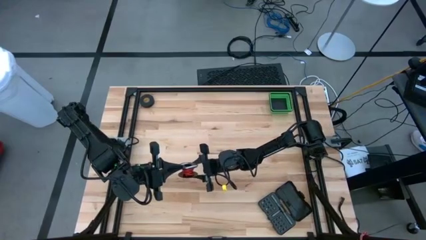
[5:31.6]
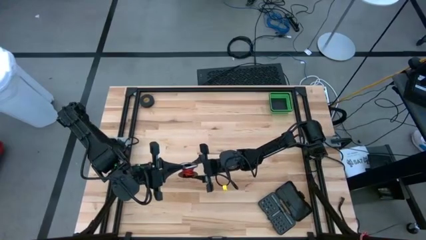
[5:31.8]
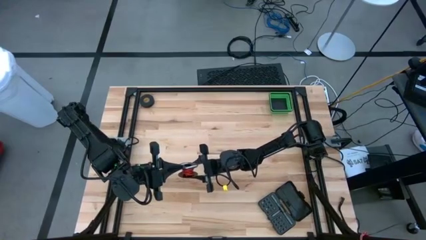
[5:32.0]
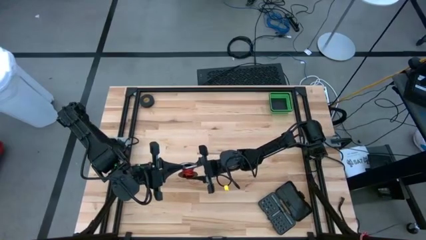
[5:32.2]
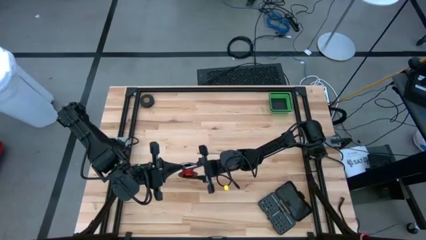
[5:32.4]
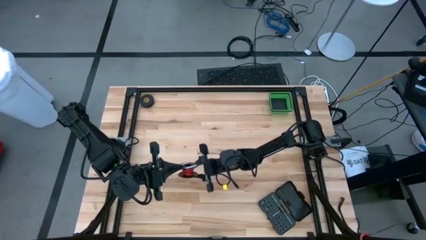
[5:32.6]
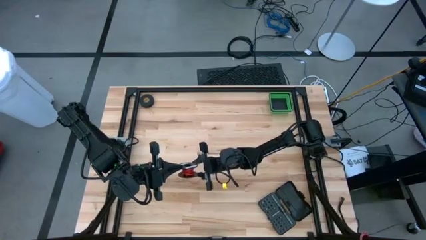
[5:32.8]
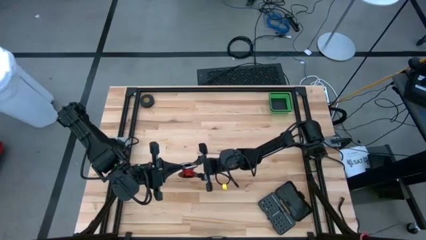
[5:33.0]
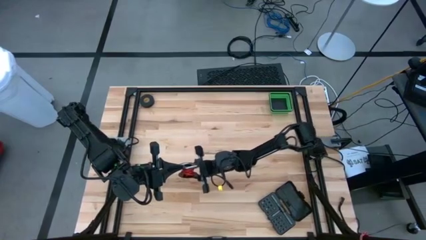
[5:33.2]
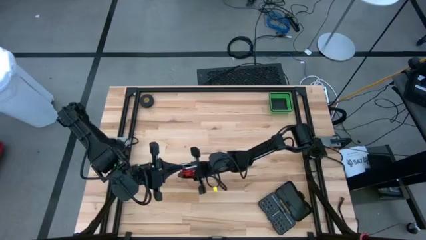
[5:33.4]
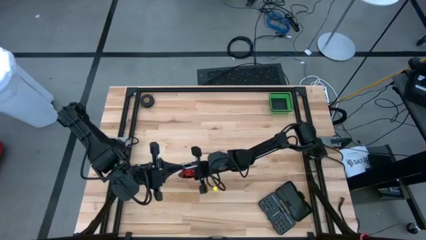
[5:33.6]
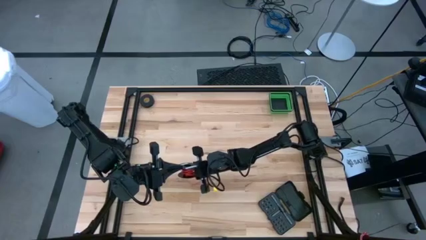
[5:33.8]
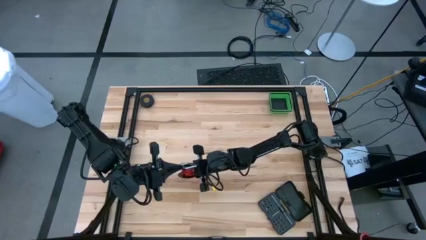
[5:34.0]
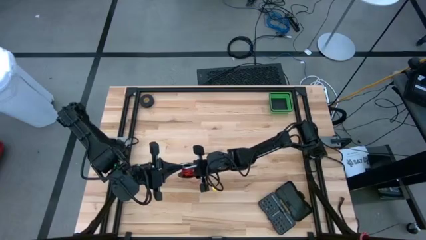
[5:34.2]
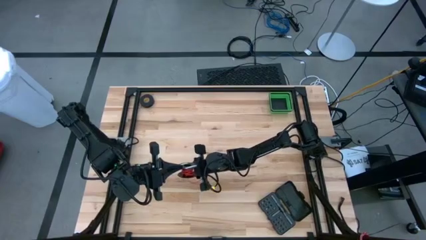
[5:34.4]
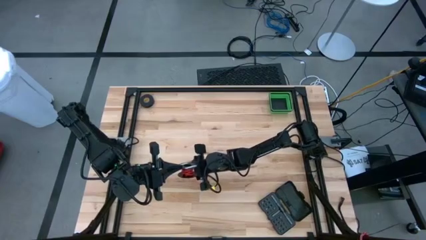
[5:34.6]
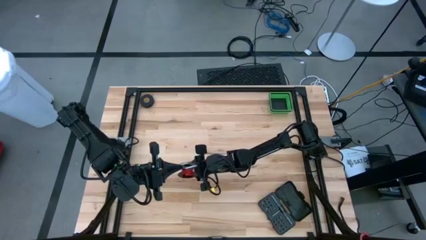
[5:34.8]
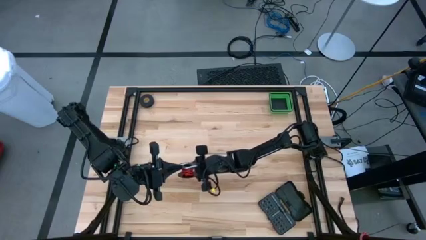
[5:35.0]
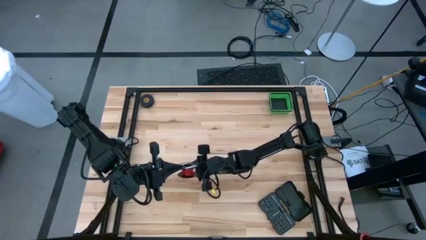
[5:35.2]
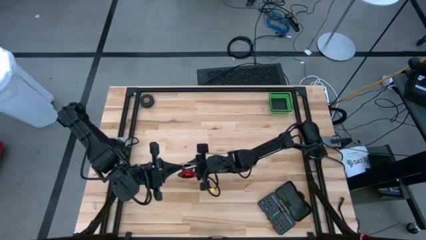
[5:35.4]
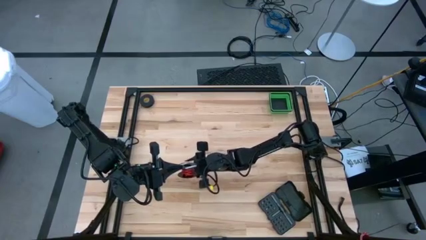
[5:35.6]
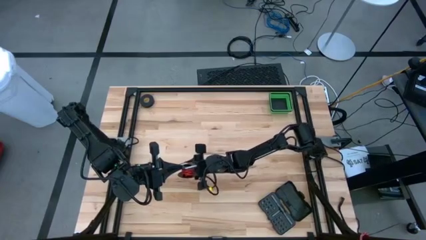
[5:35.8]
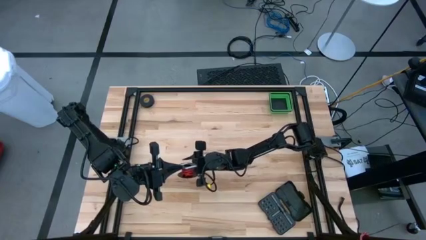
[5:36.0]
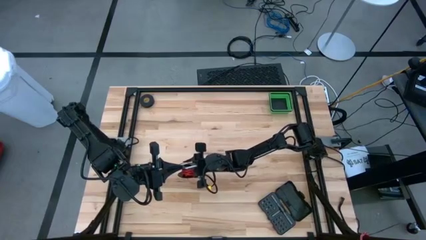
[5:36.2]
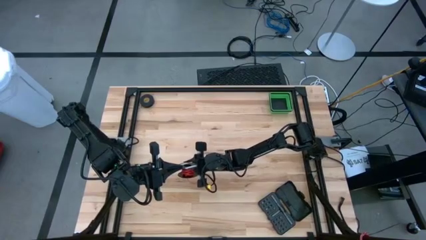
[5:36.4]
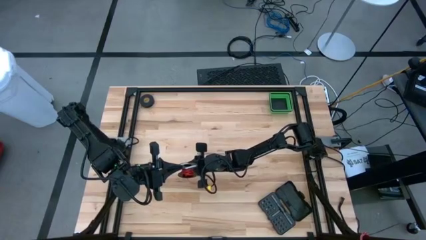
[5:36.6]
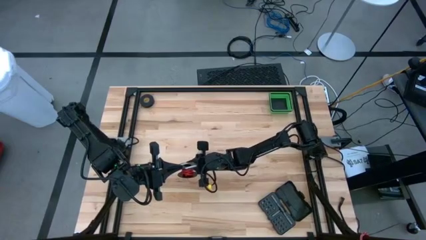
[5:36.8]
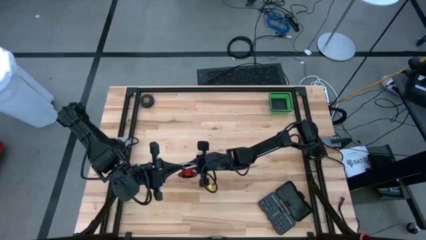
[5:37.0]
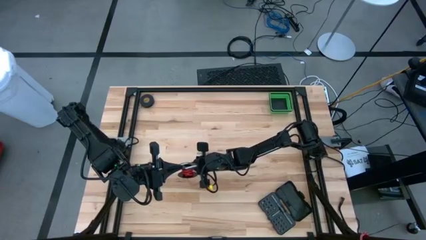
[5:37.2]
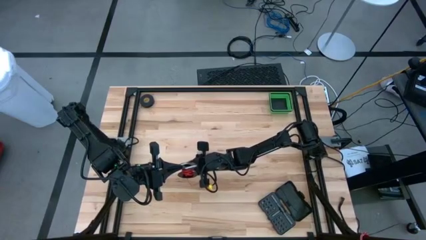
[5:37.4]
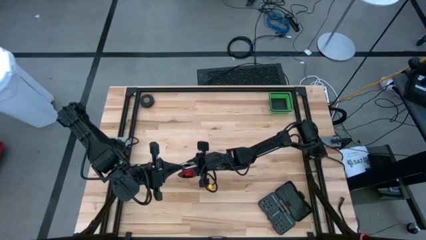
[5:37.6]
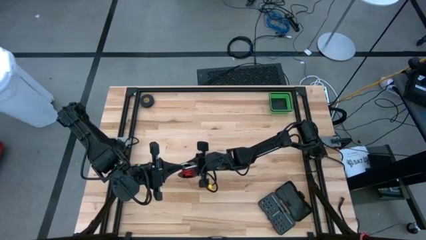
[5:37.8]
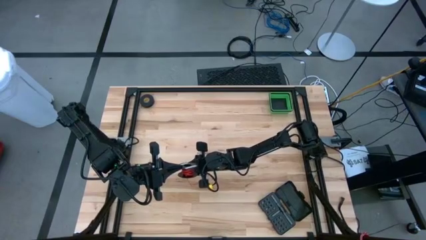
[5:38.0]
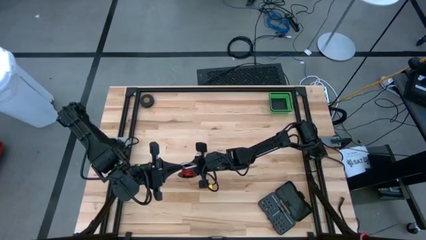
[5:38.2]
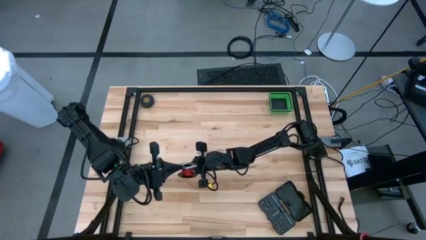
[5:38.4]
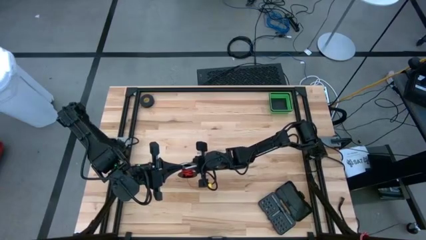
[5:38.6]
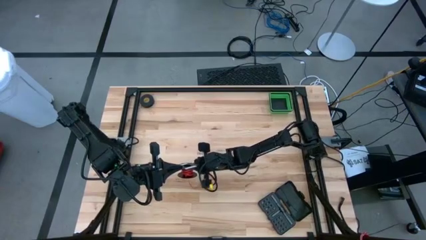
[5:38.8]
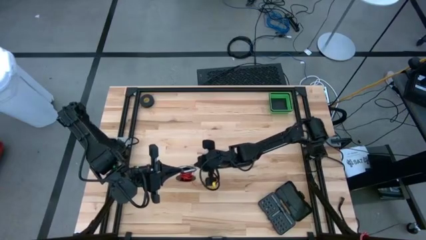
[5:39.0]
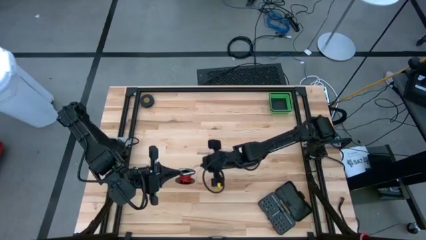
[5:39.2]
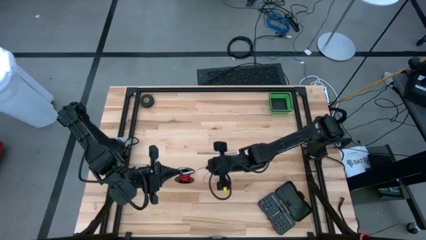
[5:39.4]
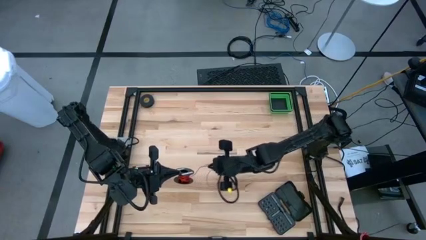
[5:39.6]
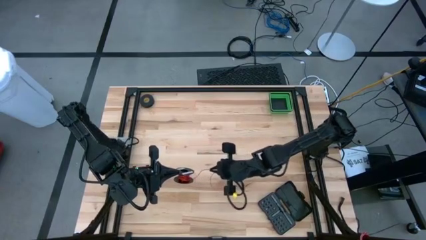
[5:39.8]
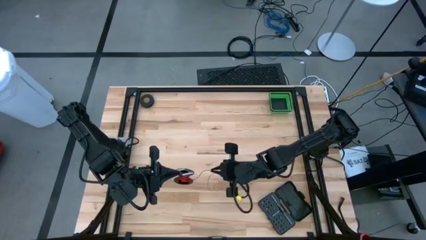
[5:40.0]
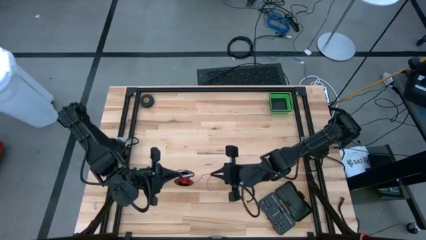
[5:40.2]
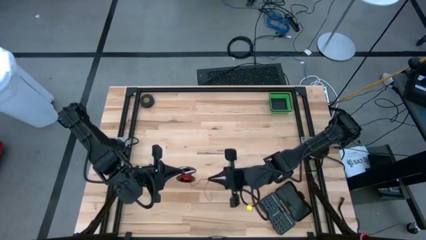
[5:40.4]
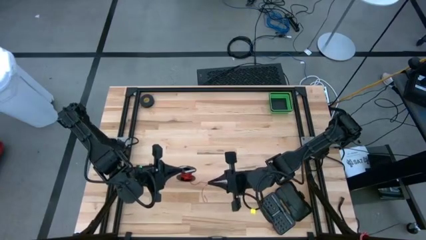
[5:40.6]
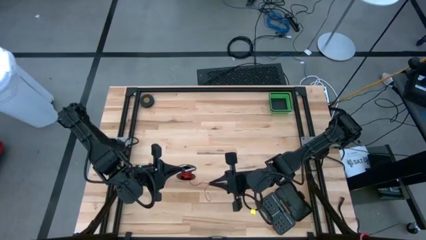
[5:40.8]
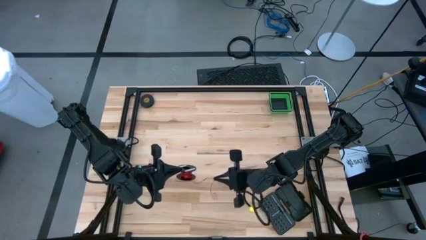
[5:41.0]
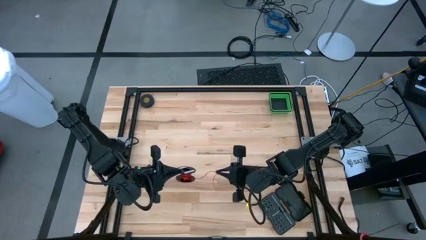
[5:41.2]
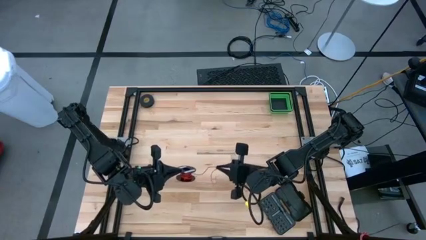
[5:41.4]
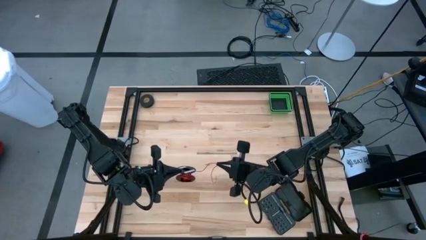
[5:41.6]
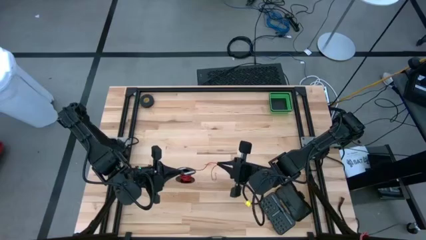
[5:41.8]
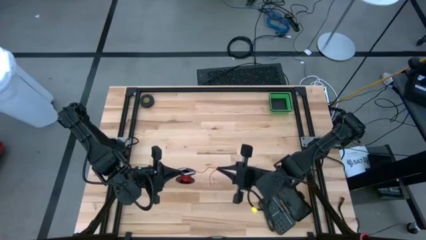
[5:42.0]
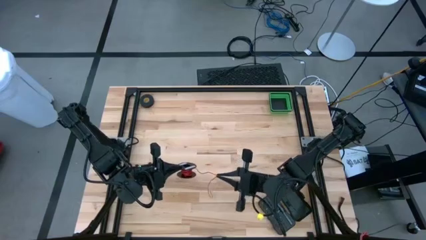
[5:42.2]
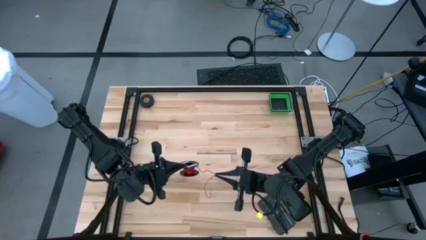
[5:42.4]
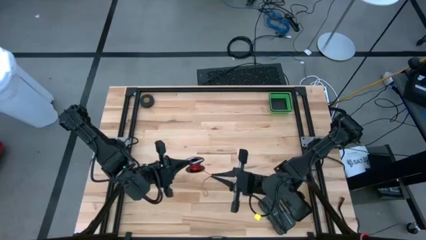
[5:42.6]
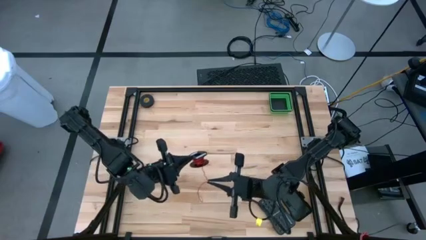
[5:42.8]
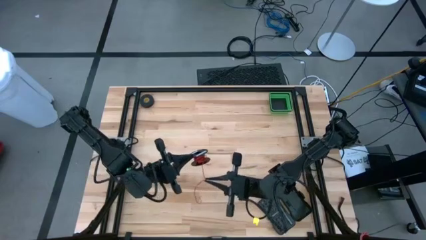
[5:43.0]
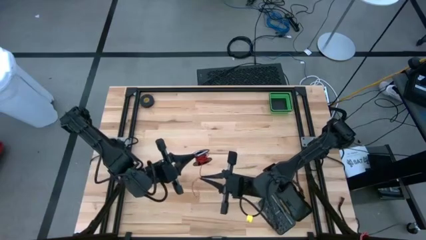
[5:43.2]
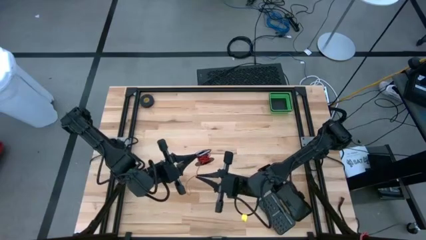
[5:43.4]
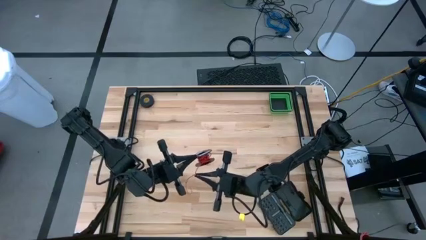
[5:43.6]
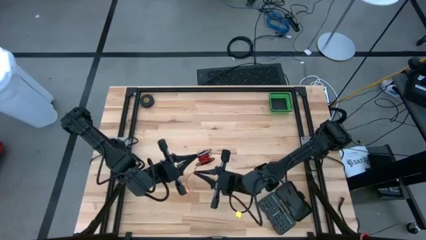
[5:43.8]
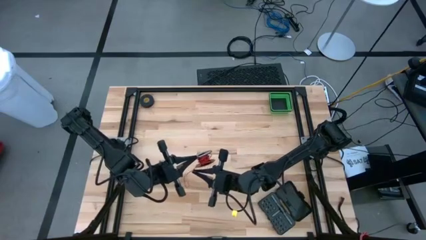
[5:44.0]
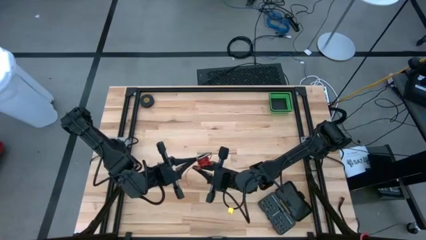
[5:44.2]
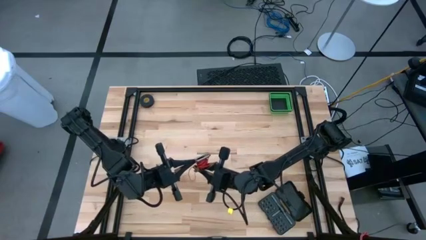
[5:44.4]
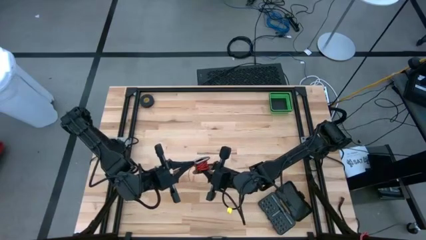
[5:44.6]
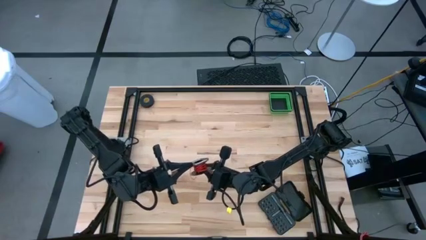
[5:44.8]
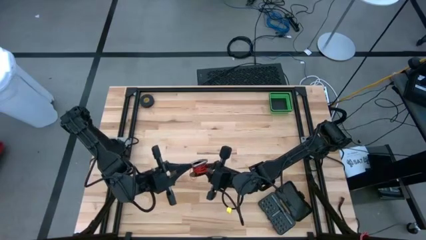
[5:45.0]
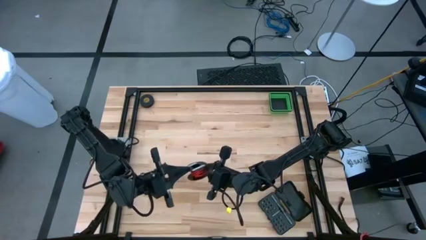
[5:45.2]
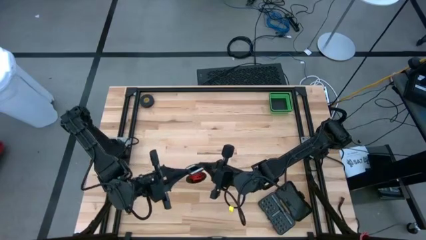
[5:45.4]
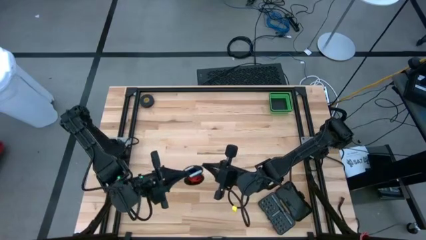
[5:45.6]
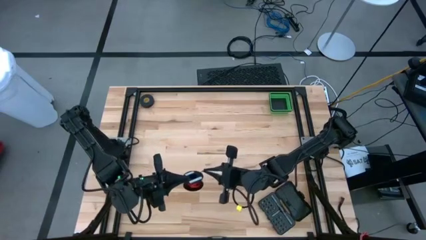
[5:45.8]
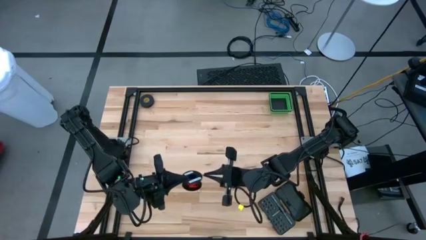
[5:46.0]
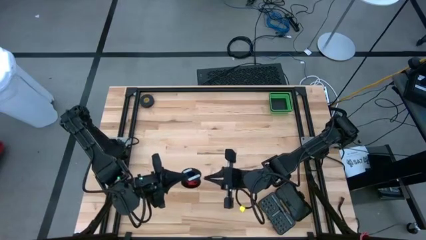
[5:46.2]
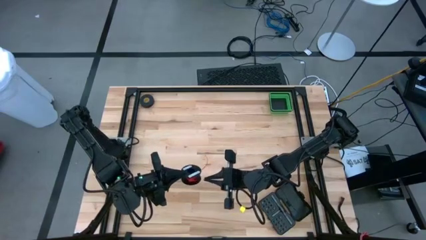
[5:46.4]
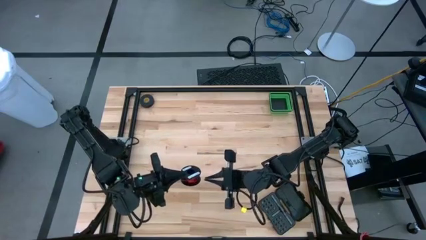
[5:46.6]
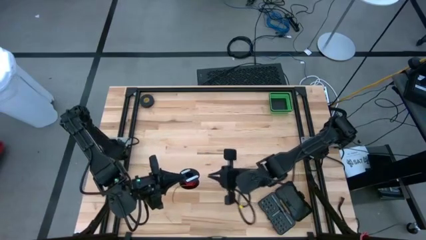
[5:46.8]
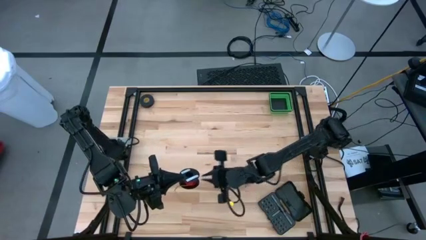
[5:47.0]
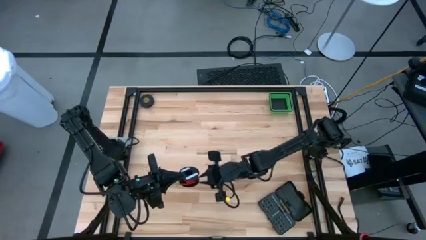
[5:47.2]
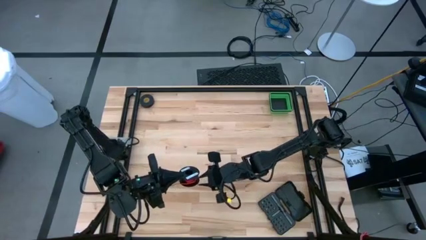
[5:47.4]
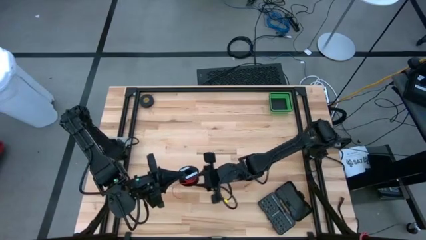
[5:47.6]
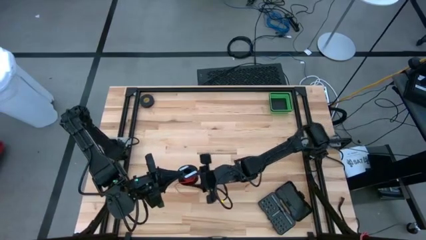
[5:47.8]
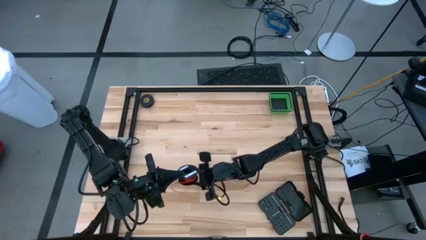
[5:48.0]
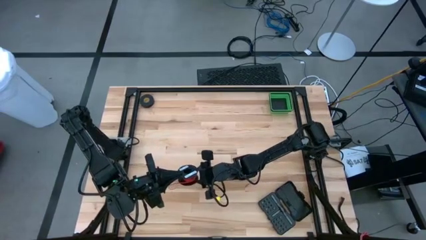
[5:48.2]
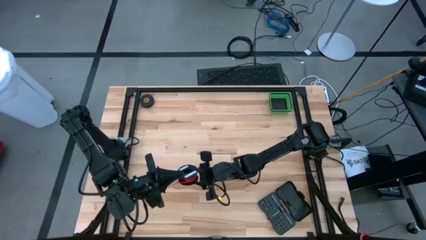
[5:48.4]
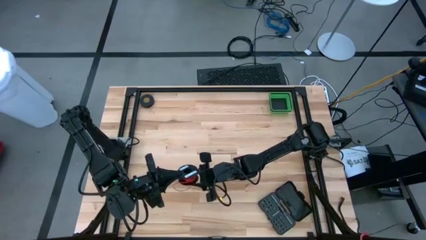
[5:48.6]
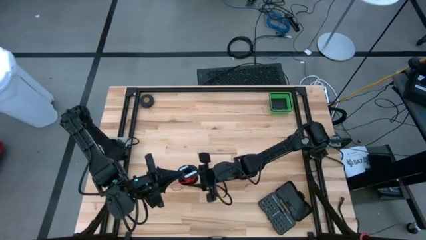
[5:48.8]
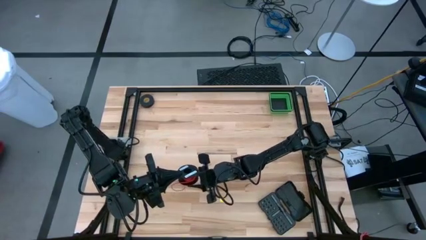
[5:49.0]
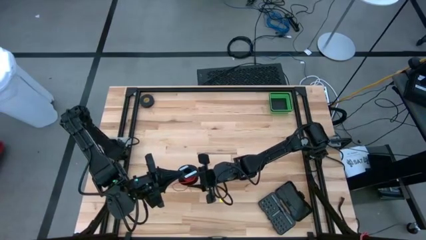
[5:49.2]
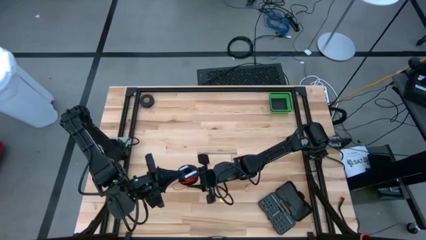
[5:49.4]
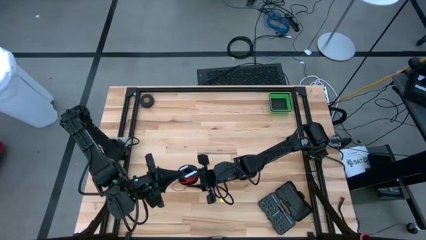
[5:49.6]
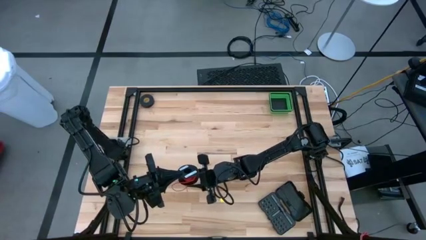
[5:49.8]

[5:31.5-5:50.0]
Task: Coil cords
Coil the red wire on the black spool
